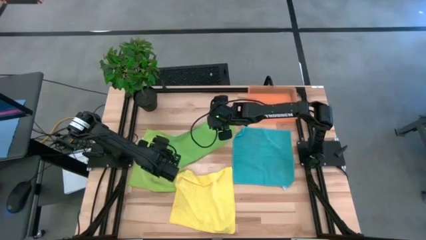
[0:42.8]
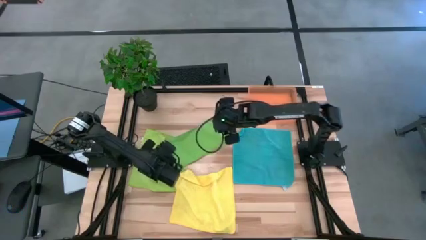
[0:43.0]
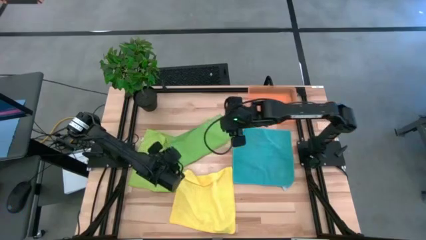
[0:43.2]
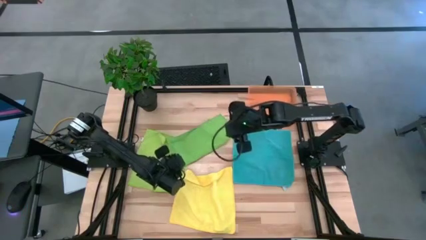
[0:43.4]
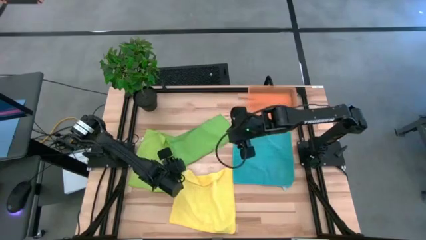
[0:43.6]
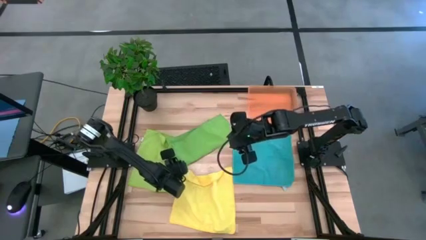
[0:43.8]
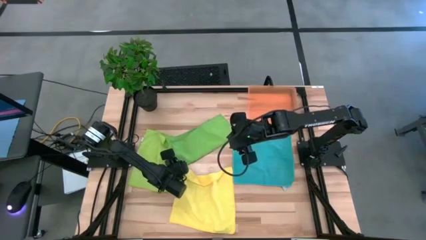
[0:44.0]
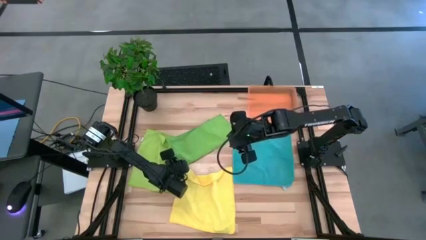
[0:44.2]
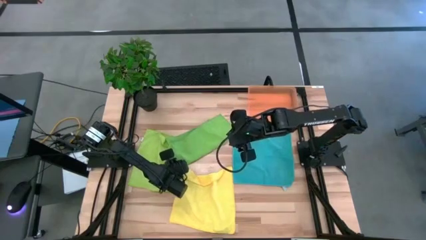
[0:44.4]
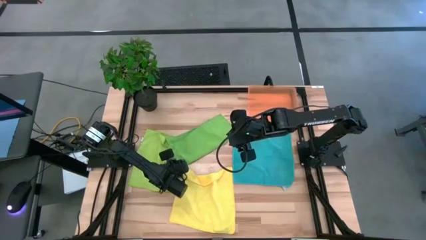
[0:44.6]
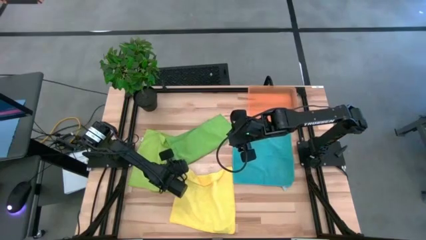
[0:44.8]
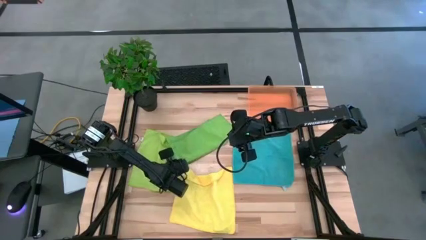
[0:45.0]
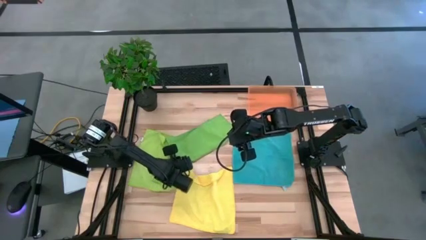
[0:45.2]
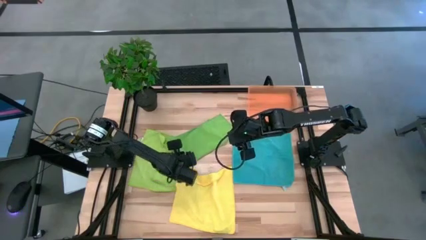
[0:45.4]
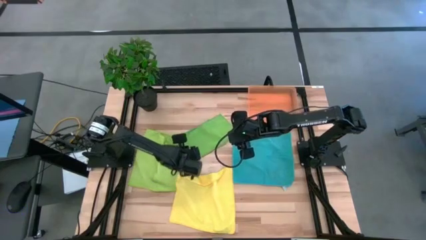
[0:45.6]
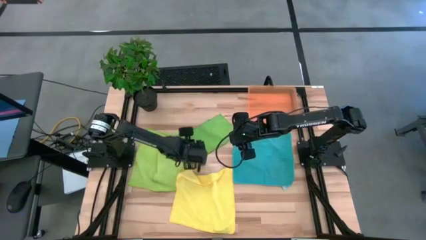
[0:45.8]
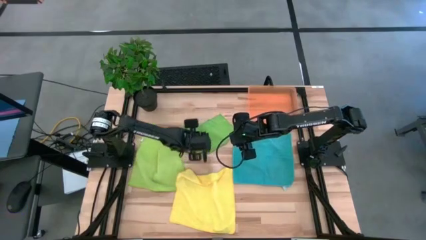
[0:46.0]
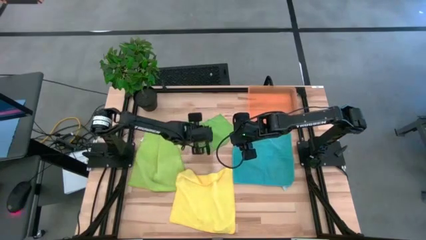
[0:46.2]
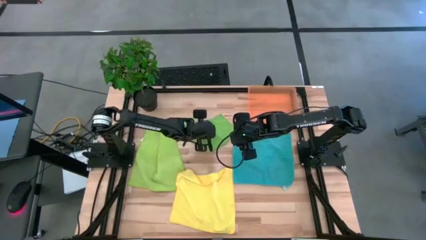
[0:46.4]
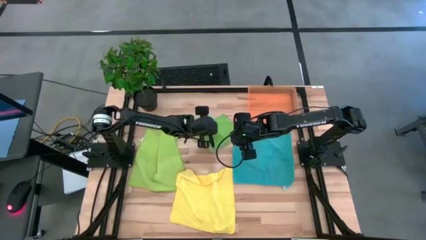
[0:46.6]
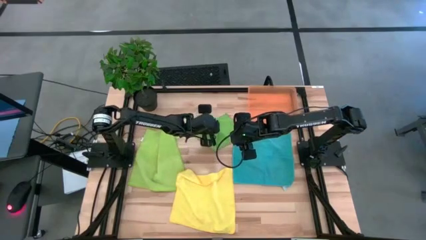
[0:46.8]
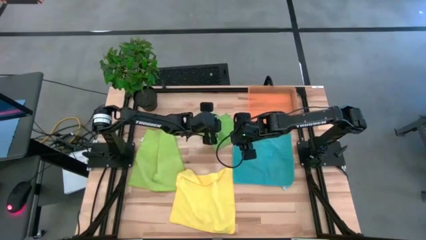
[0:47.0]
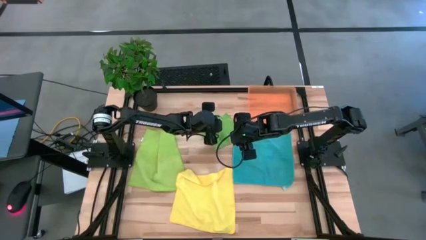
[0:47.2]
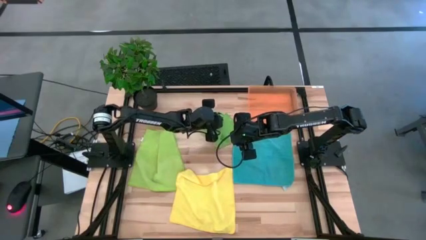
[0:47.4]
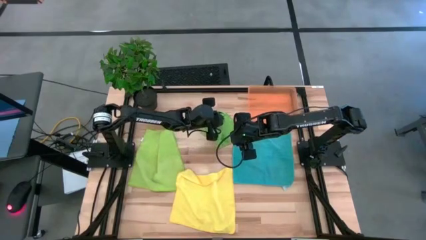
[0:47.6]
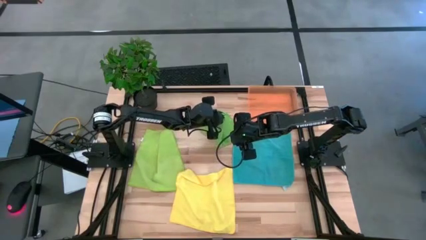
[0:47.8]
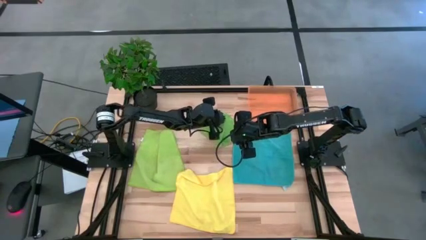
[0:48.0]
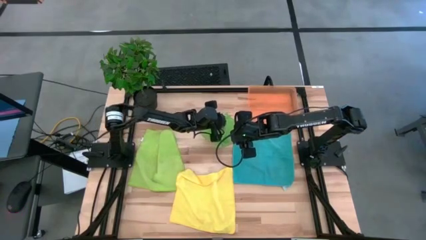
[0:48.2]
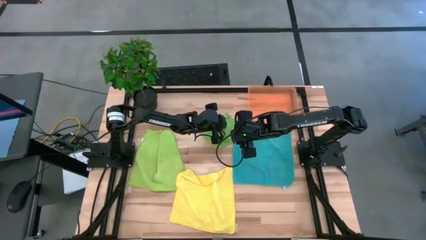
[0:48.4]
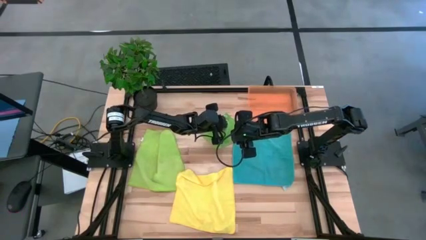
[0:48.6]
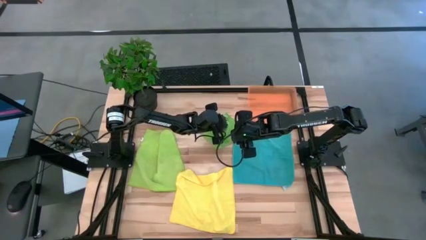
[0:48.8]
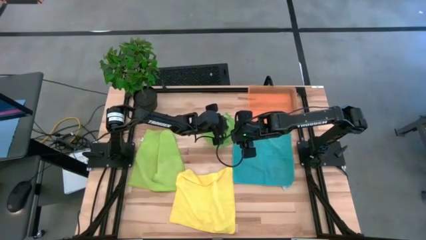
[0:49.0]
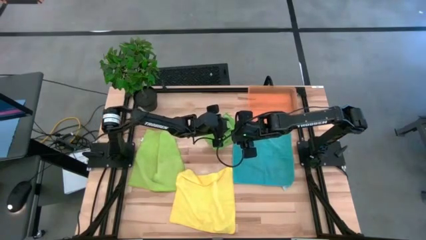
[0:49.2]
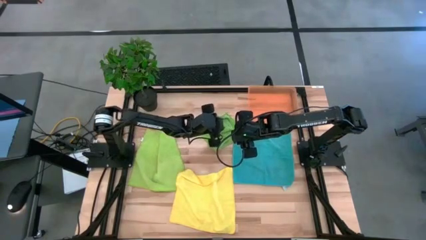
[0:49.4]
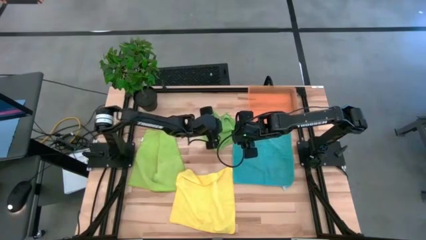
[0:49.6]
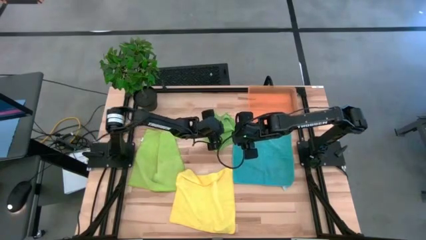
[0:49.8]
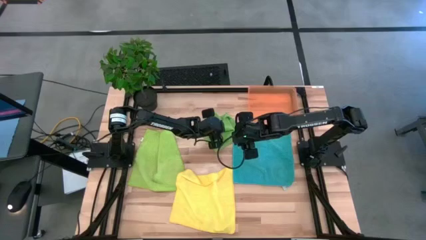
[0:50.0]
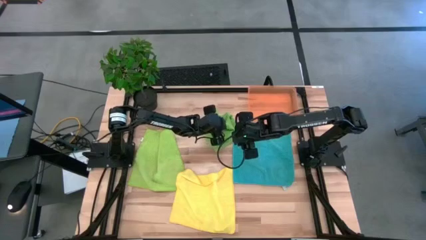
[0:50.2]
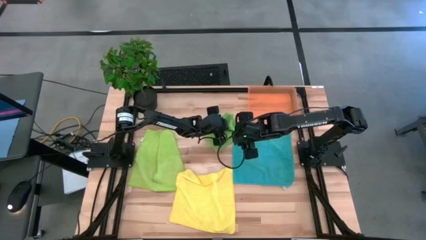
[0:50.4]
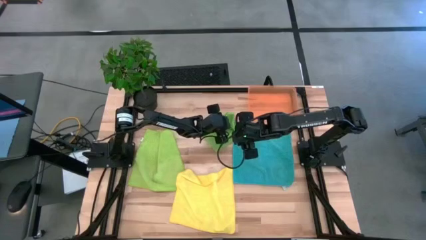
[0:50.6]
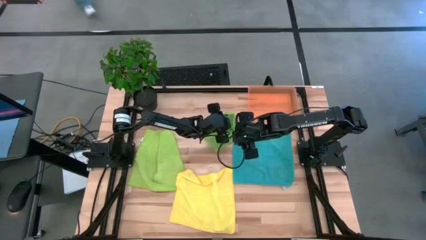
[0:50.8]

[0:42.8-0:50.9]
Task: Fold microfiber towels
Fold the green microfiber towel

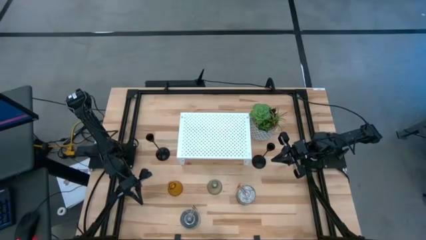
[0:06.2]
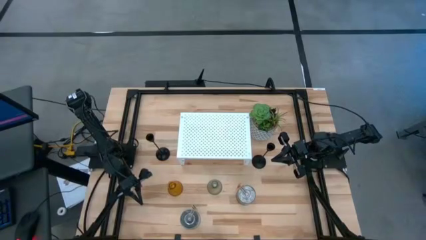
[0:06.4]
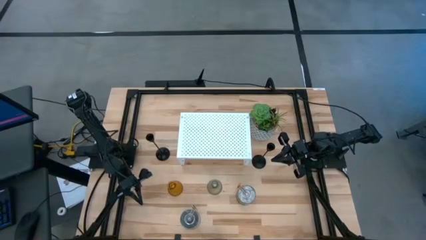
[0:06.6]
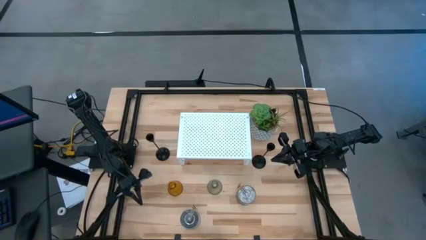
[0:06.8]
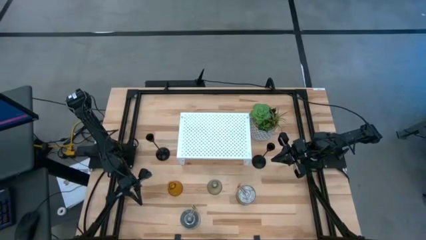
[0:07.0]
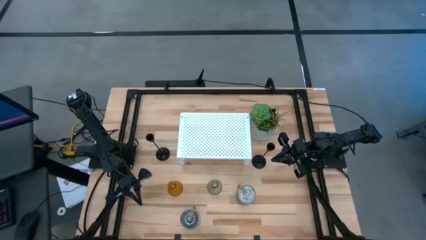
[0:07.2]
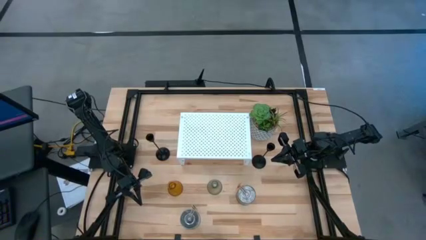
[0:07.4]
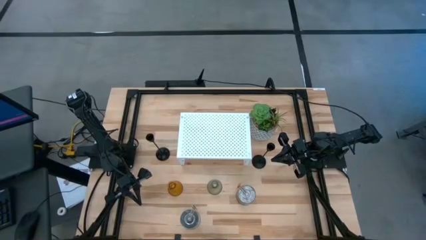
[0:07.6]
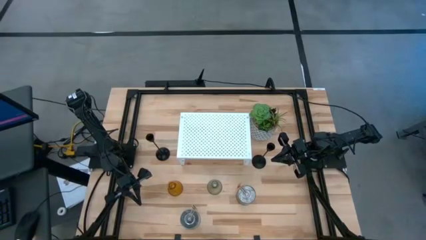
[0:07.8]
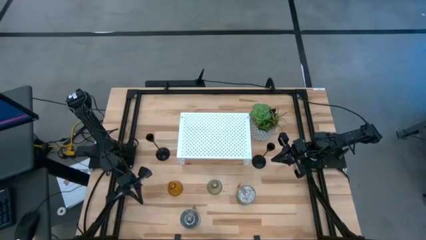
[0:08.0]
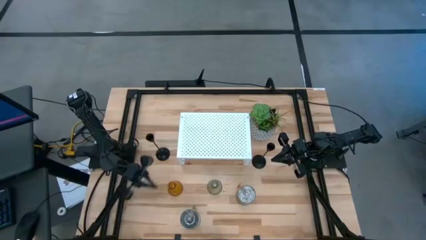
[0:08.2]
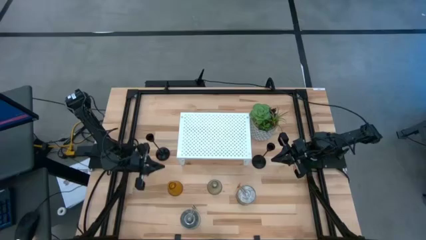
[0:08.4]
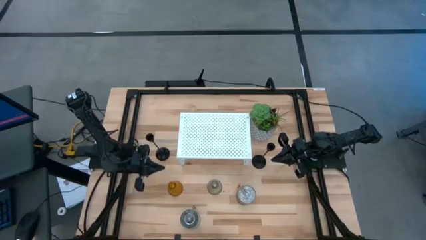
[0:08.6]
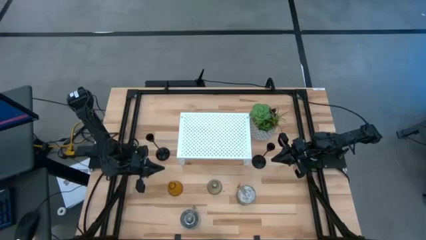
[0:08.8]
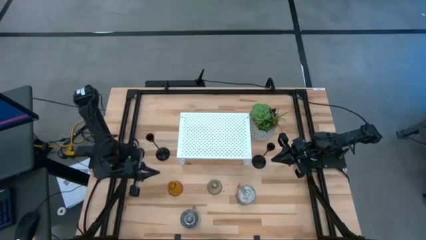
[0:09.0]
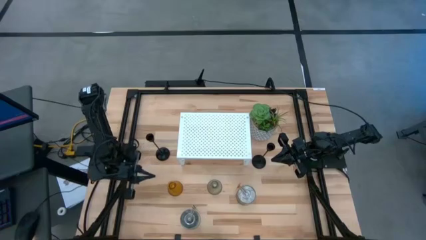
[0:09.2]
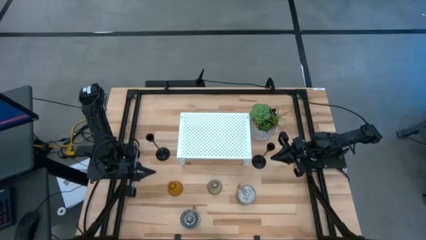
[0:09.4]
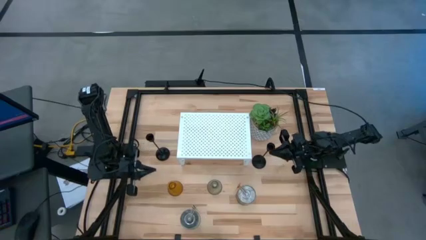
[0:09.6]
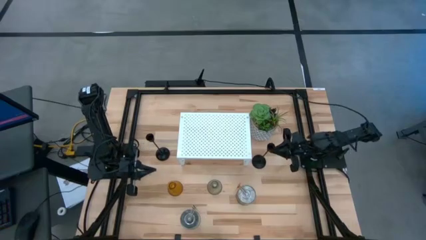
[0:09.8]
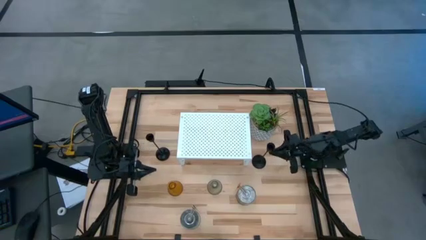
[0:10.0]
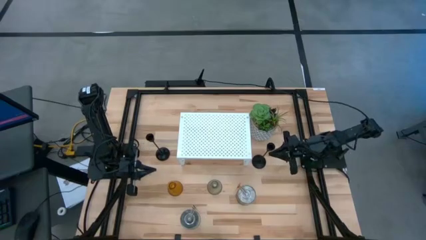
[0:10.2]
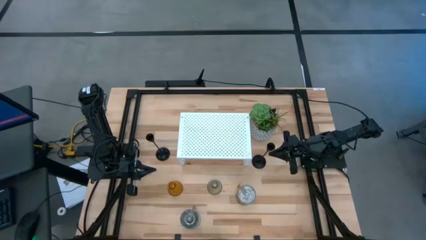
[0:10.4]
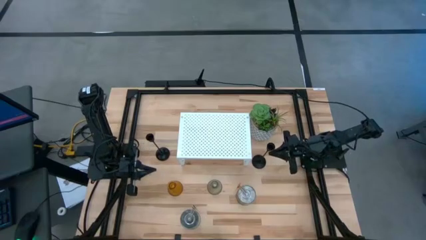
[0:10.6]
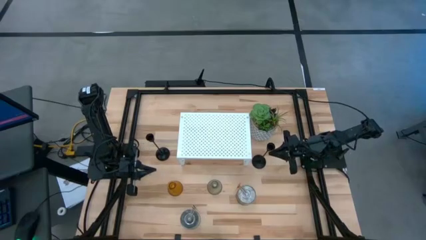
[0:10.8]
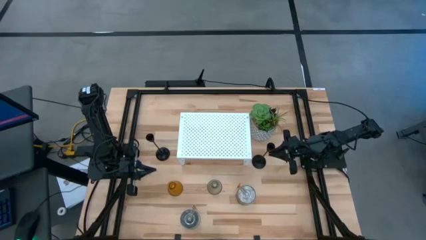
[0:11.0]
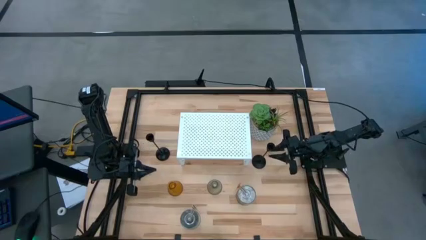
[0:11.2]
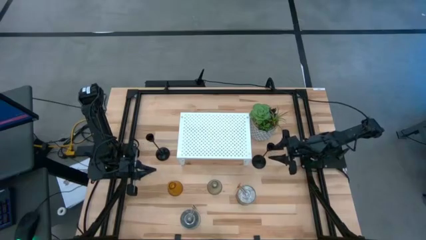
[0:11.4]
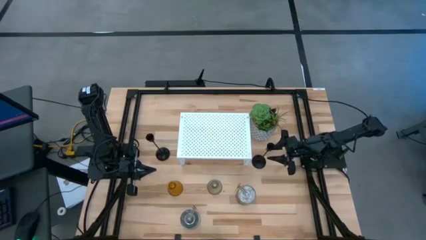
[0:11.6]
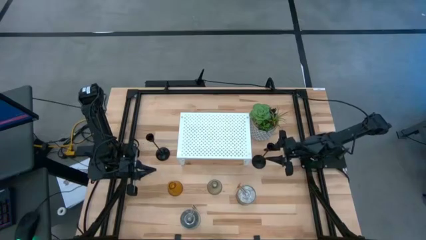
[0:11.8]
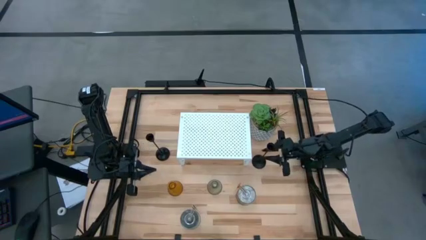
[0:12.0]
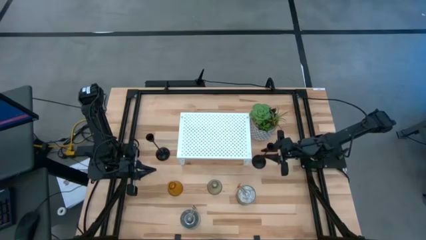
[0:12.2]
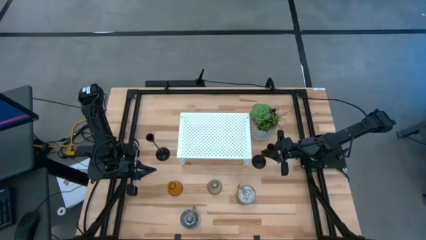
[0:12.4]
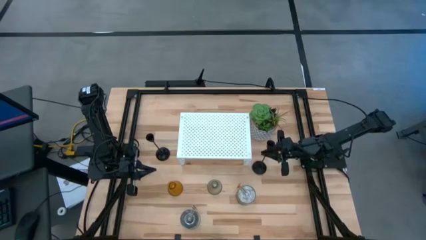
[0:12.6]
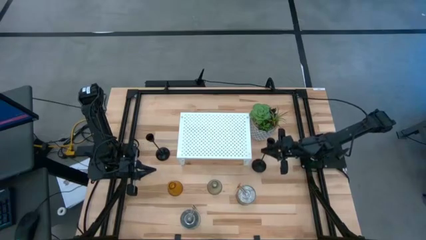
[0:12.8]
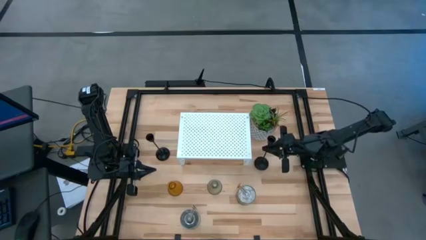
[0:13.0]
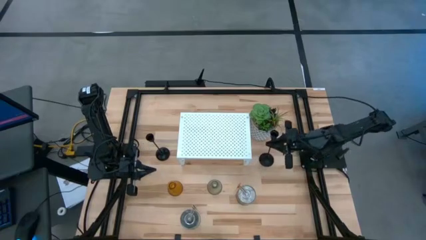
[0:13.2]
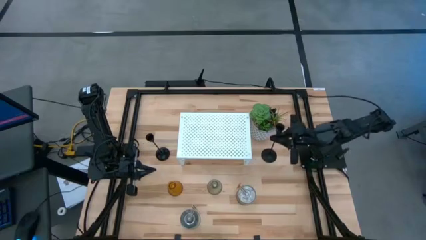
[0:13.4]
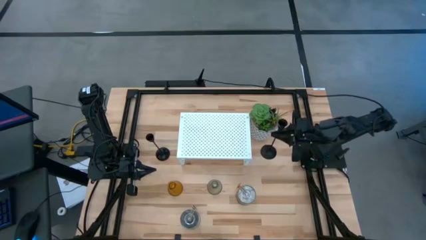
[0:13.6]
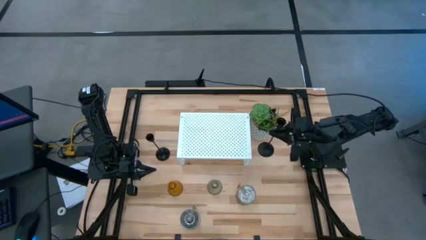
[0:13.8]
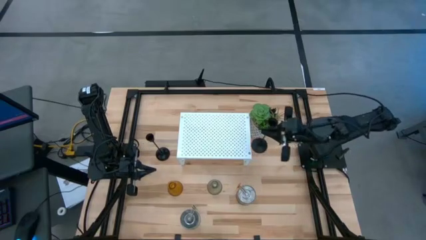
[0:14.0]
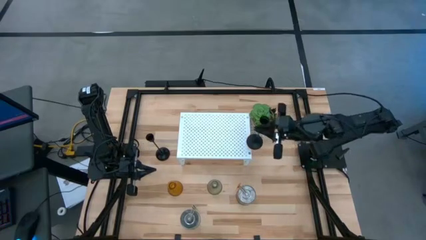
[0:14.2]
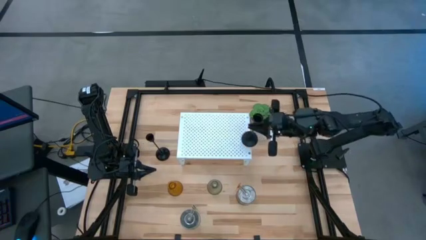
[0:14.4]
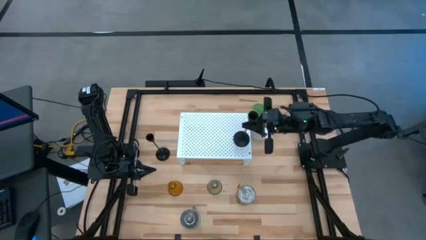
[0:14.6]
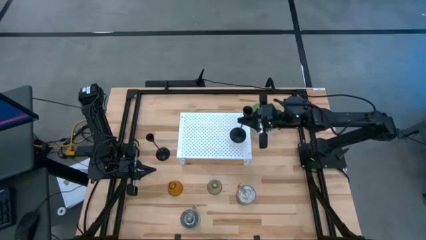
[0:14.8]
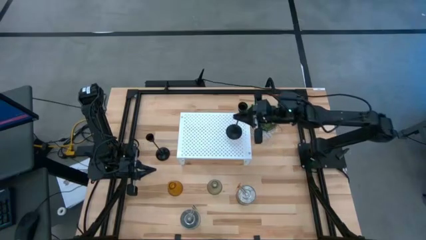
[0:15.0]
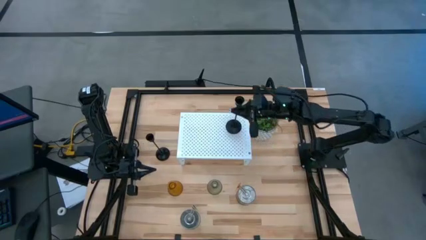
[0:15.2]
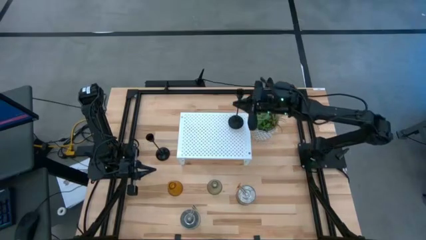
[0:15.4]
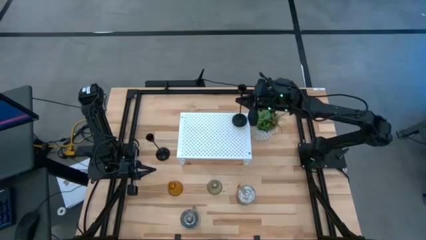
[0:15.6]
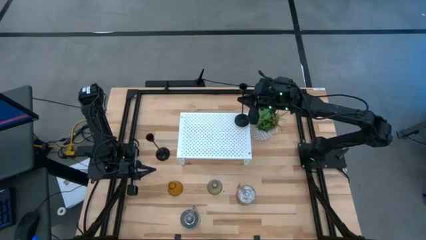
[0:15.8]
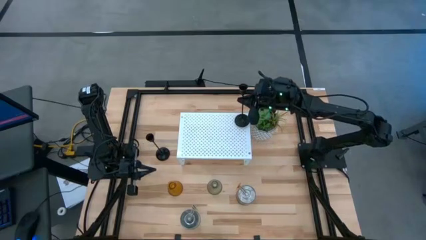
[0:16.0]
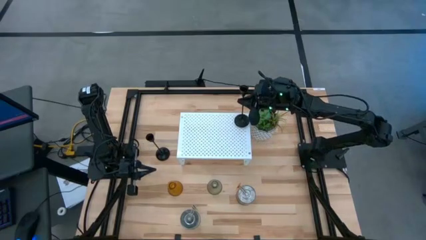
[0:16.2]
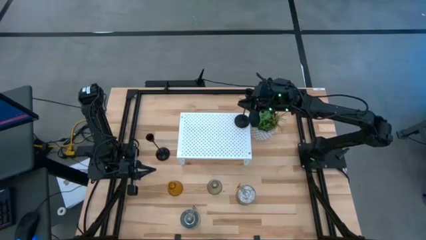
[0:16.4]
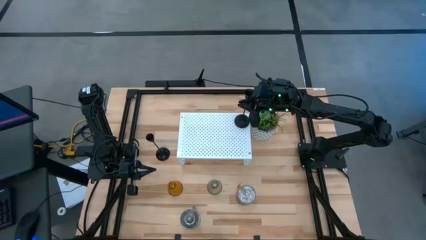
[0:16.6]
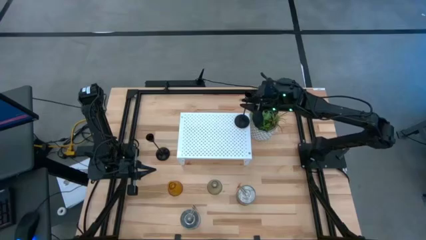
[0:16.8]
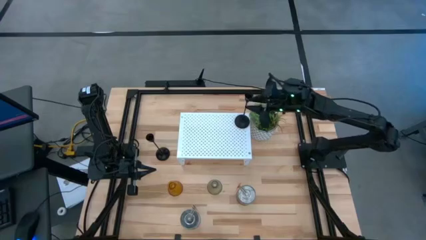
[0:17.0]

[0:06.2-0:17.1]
Task: Pick & Place candle stick holders
Put the right black candle holder on the shelf
